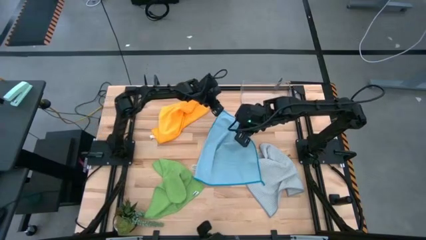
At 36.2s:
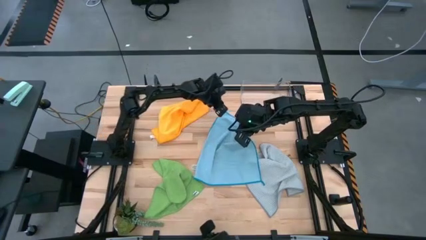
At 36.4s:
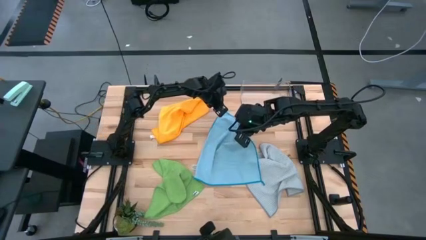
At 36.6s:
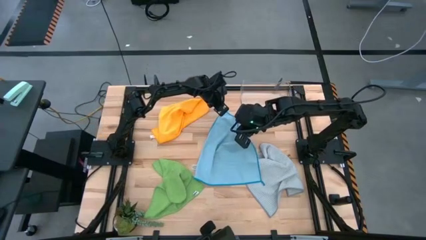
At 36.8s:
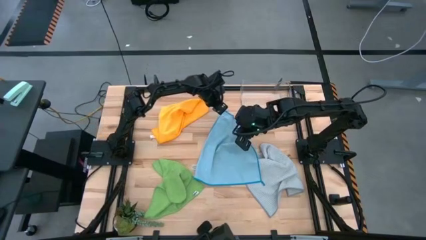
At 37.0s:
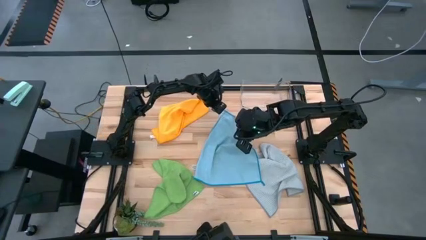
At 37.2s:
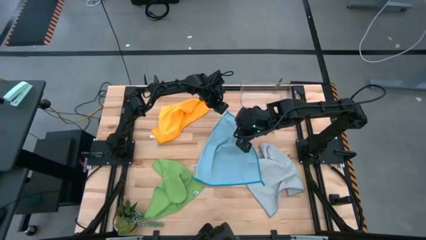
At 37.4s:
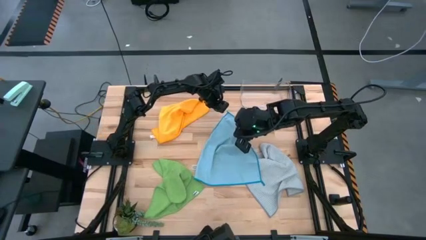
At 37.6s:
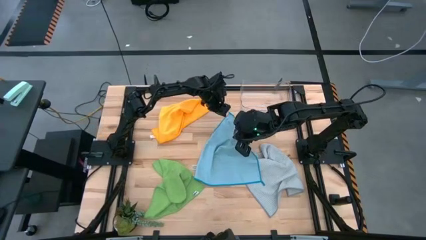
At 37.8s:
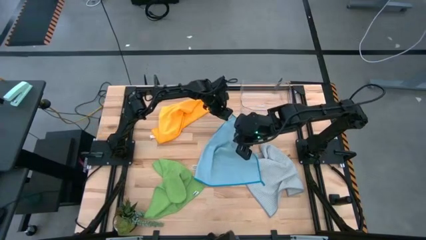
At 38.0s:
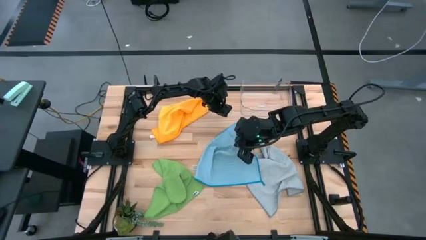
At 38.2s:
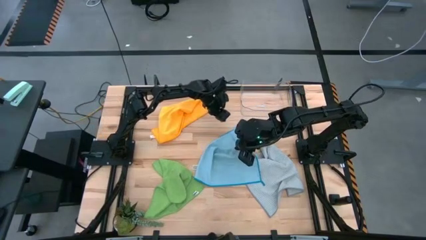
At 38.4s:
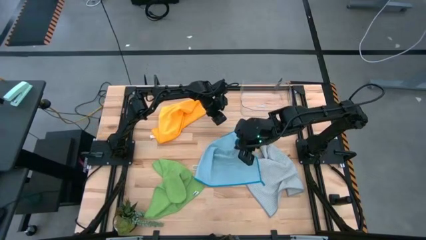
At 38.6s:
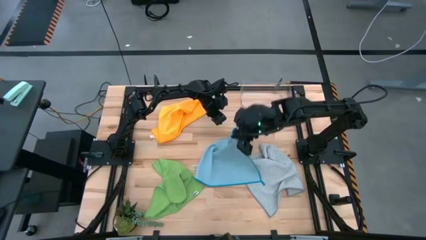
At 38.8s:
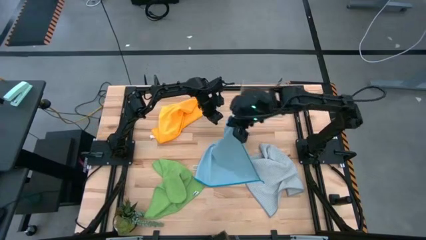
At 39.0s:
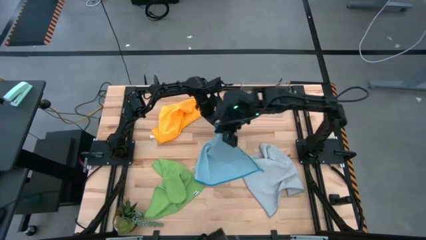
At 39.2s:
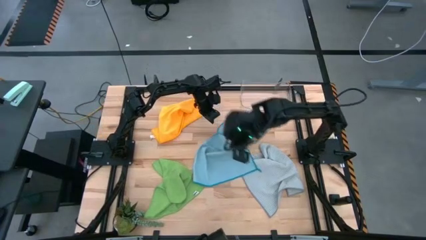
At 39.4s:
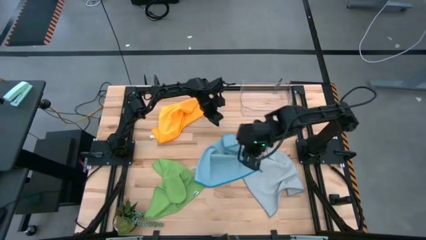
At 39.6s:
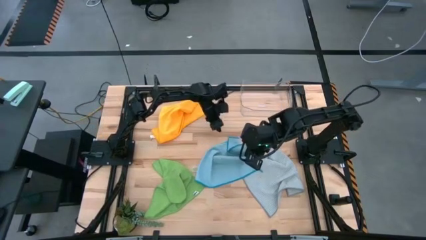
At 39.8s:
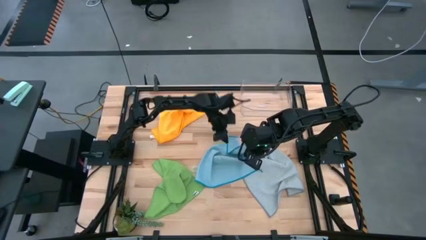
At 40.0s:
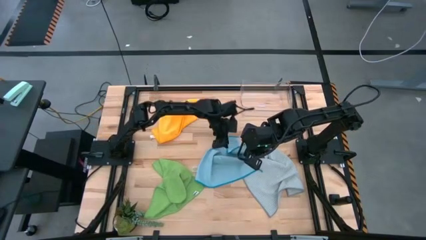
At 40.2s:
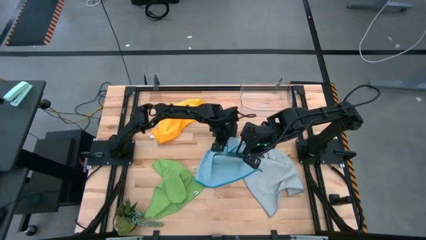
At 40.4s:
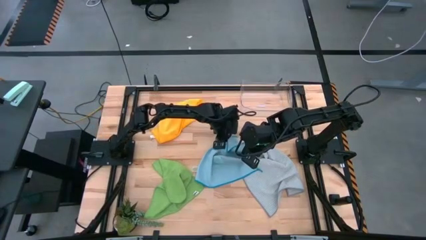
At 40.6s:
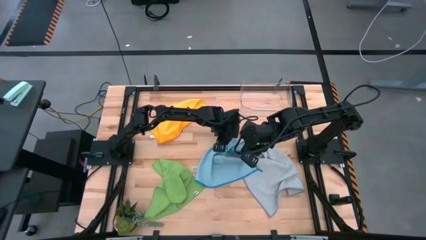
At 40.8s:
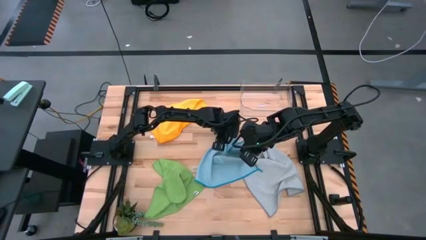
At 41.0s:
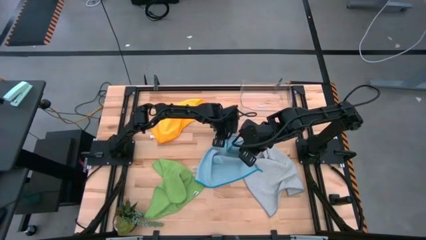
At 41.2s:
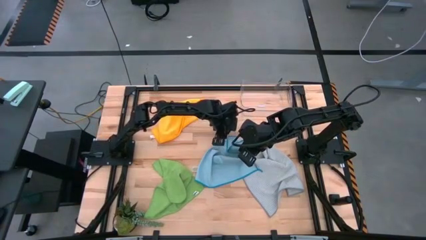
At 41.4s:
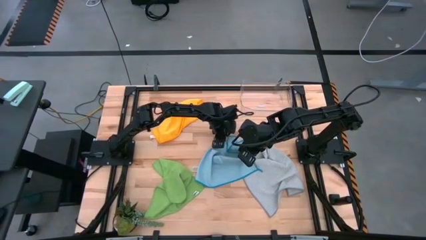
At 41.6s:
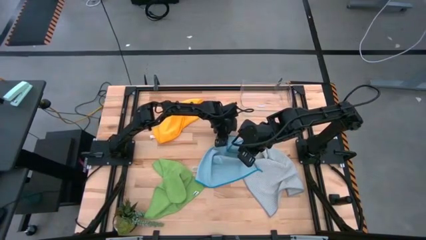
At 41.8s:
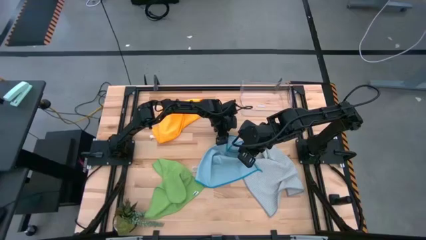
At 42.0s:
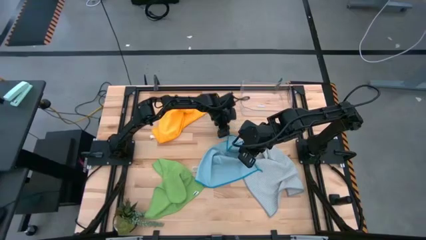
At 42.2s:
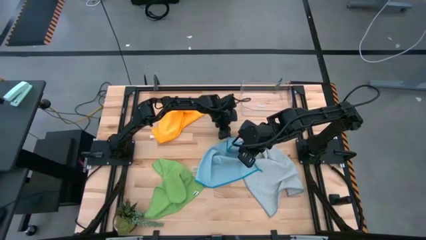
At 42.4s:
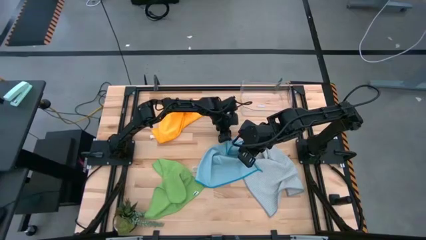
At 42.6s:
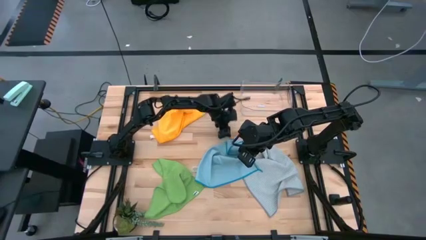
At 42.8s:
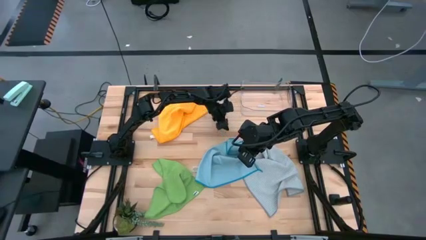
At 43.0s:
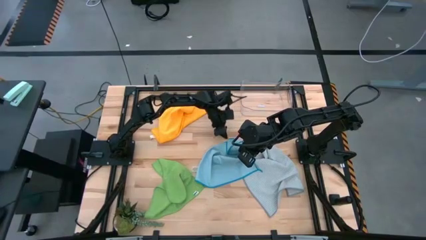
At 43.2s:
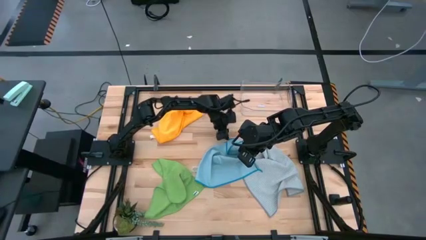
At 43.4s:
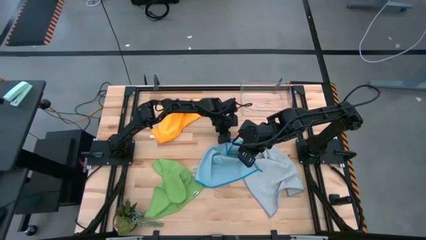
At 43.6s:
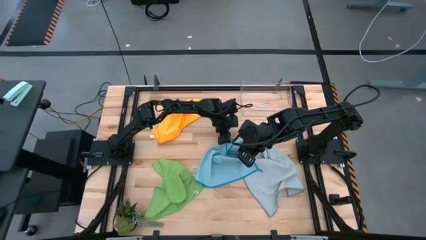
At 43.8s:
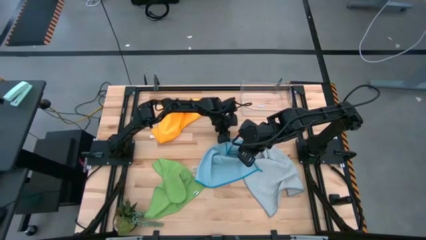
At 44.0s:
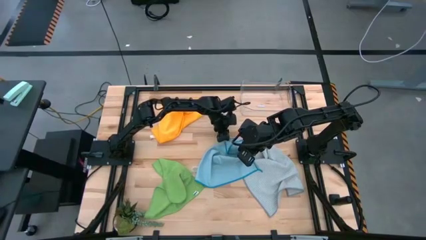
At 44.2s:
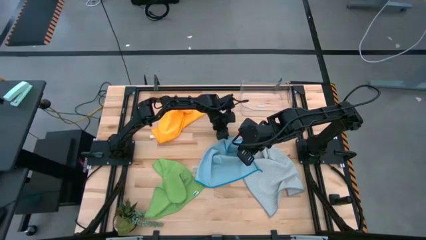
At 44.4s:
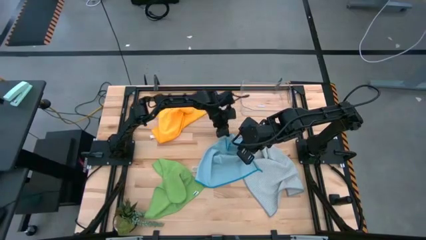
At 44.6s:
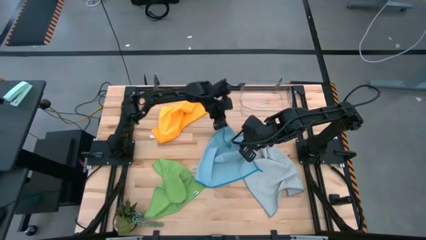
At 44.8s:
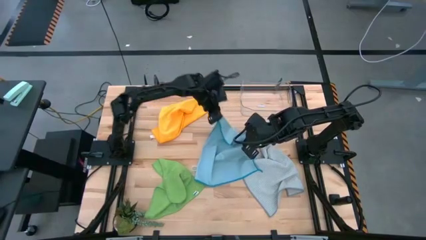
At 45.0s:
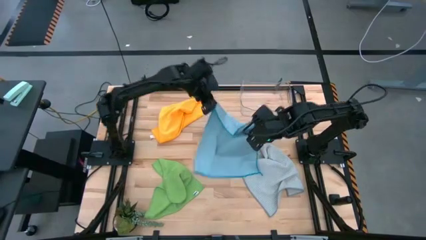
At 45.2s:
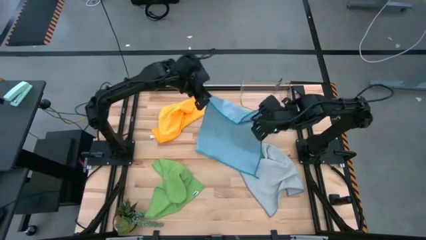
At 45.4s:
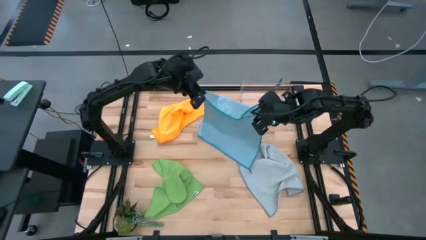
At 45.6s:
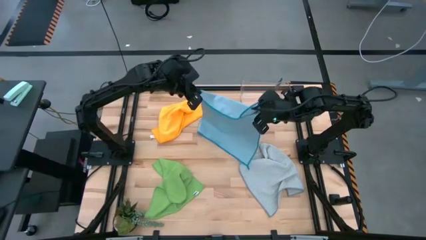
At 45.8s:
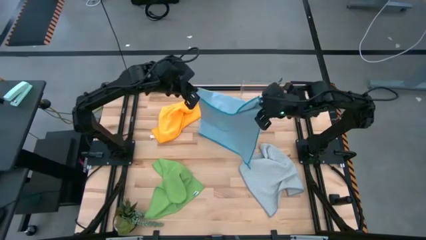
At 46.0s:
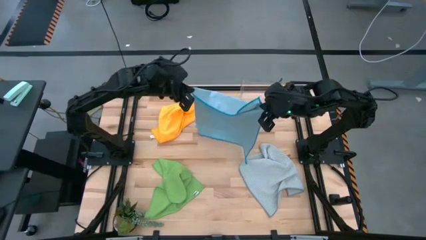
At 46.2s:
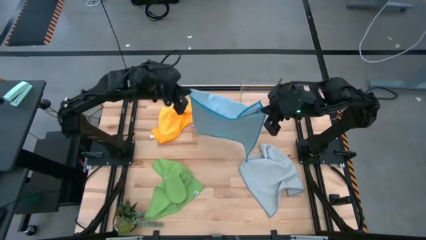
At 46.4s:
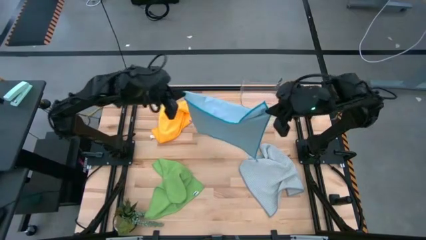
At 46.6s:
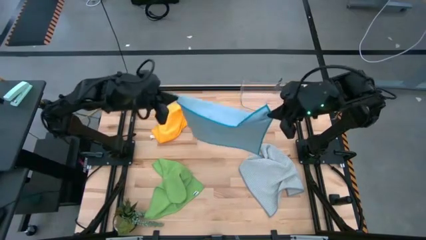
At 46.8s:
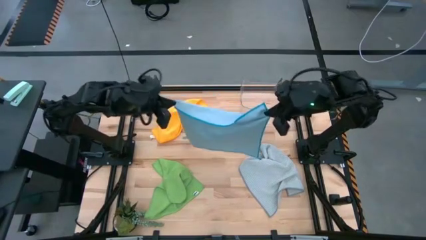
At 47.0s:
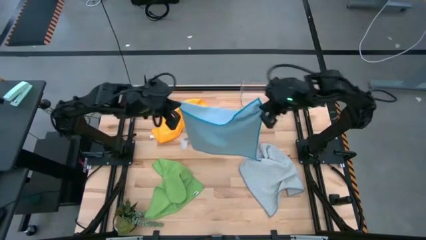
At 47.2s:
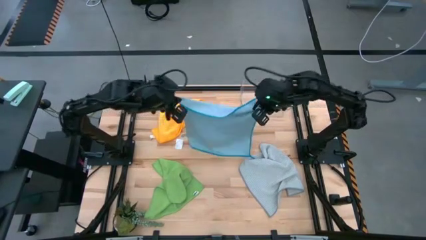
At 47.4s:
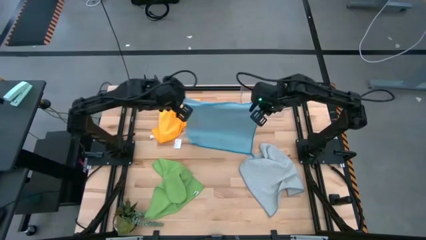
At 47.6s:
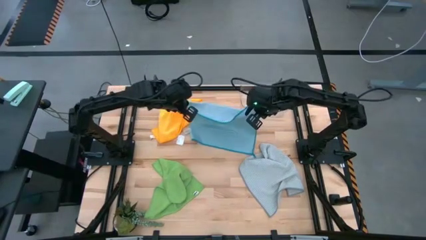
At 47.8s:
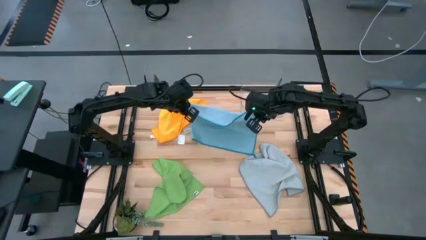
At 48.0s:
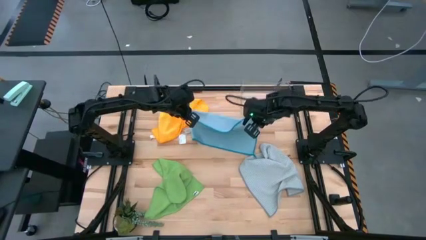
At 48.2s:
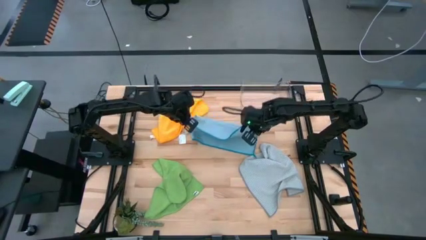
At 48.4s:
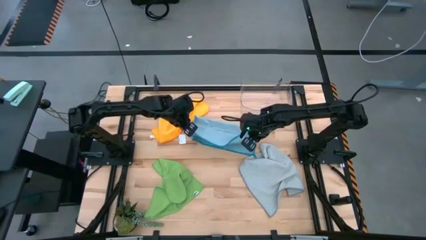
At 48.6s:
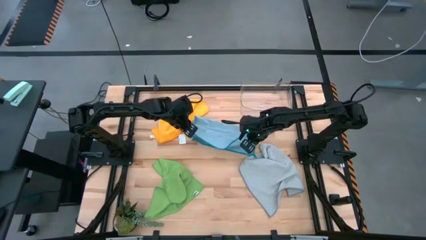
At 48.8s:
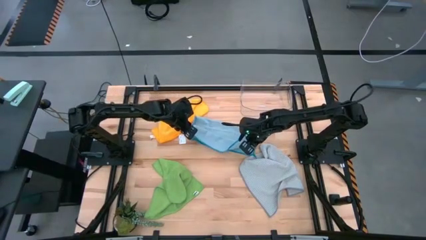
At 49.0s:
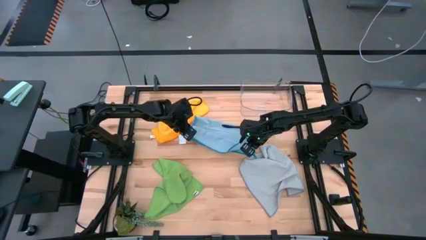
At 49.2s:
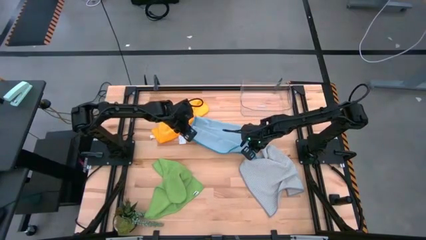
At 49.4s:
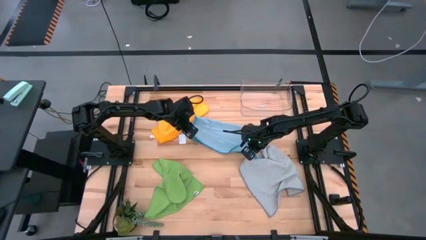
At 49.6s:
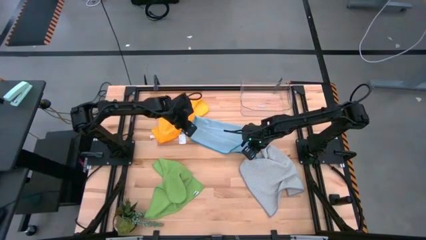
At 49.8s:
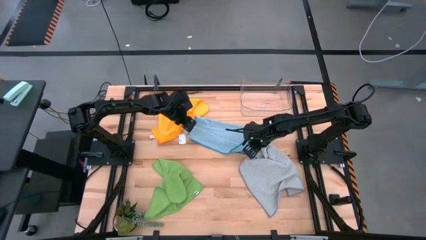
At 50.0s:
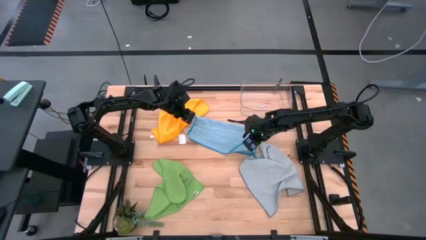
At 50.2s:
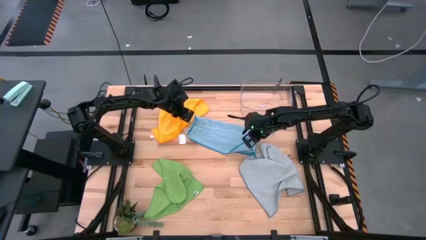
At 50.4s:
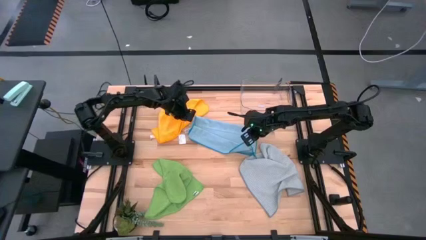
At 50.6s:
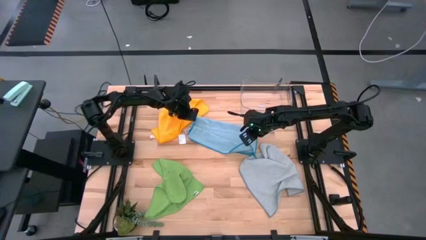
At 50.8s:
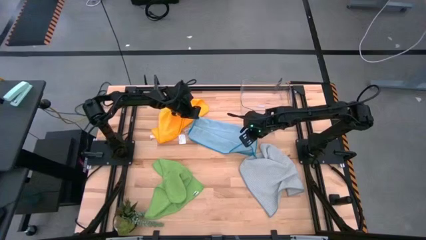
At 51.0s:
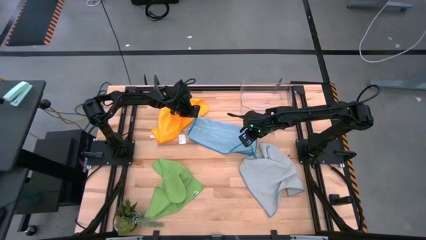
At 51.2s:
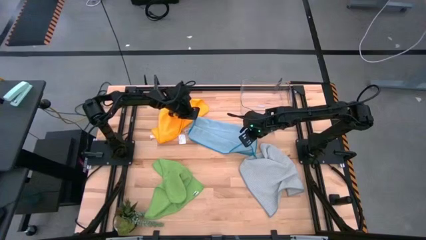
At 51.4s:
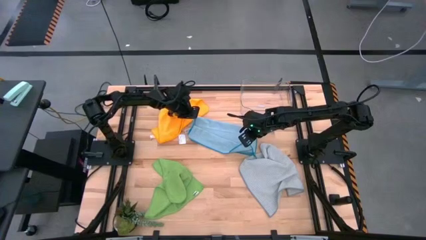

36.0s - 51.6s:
Task: Fold microfiber towels
Fold the blue microfiber cloth

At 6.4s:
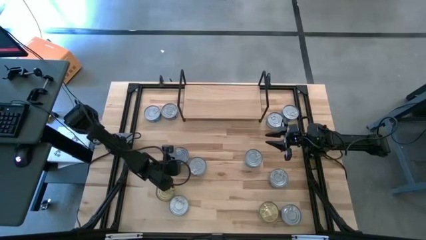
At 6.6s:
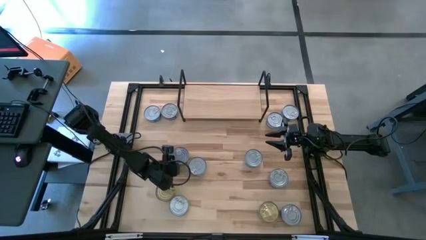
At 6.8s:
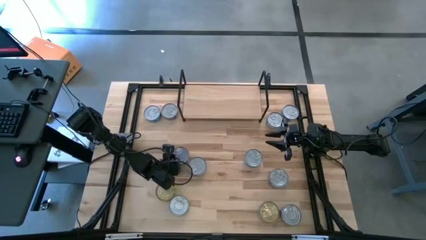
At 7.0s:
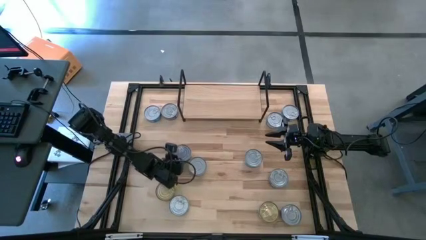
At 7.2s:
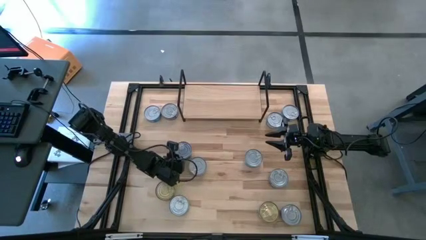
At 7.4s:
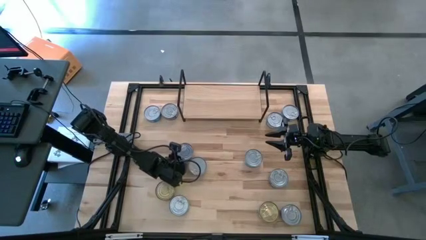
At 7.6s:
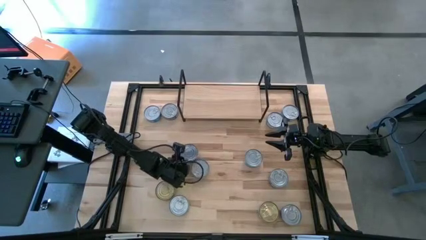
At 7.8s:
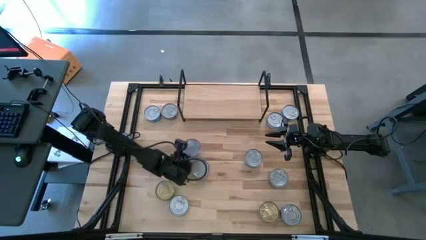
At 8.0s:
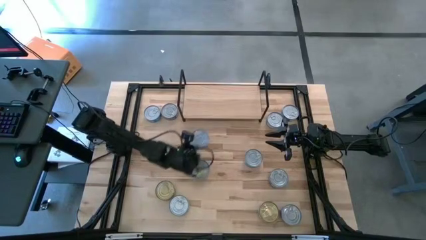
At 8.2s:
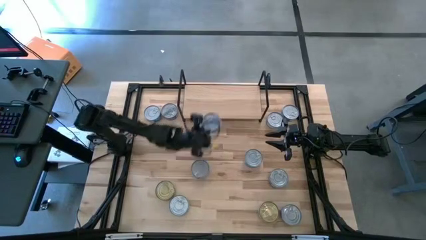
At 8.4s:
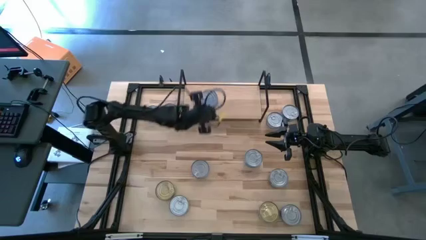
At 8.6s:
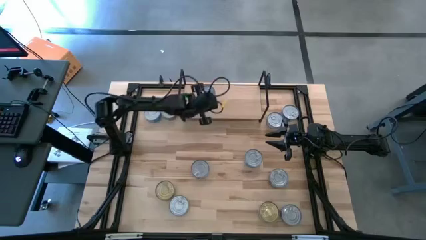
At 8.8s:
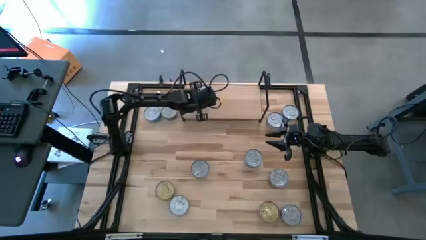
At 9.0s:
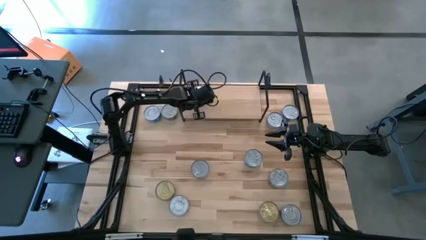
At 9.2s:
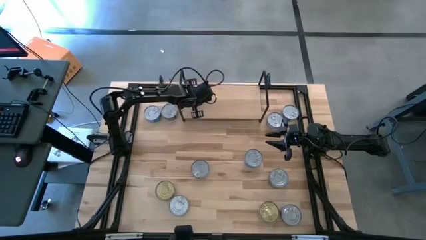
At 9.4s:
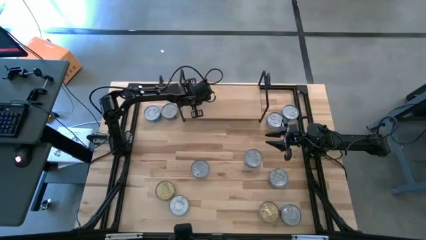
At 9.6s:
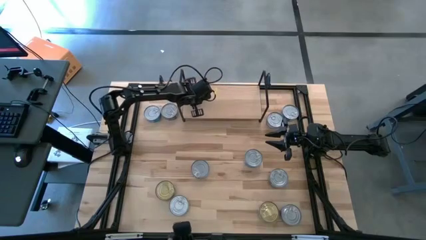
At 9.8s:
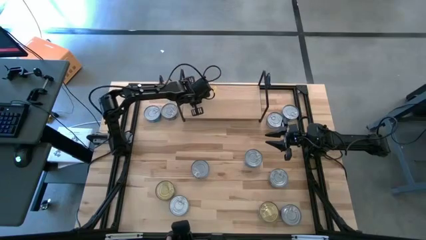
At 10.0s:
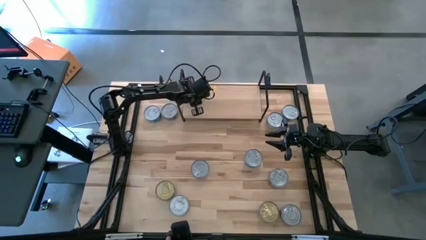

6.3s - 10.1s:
Task: Stack canned seafood by type on shelf
Put the green tuna can on the shelf
